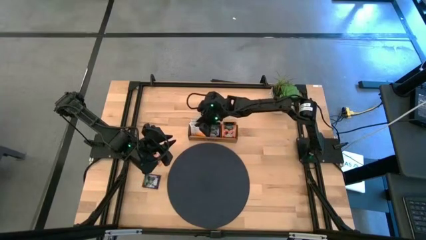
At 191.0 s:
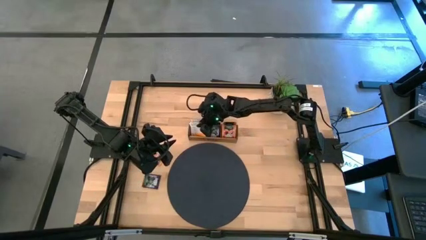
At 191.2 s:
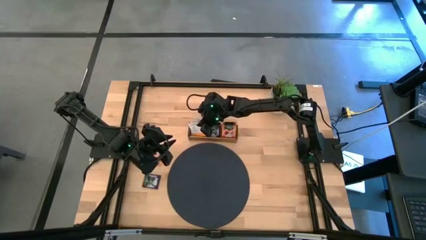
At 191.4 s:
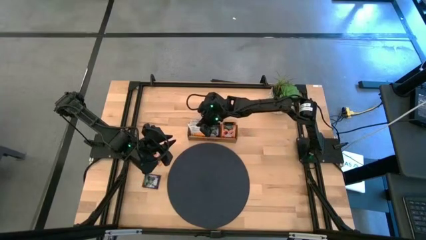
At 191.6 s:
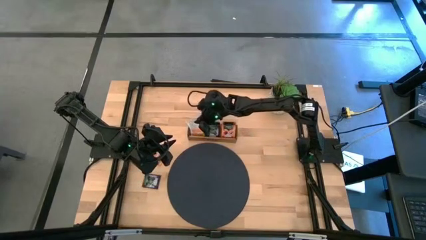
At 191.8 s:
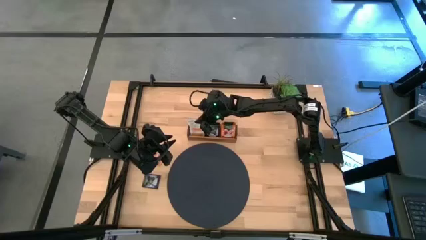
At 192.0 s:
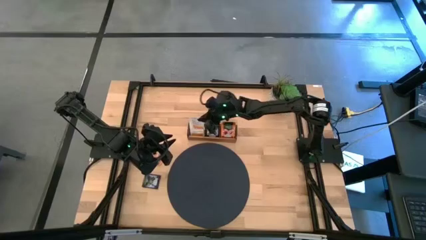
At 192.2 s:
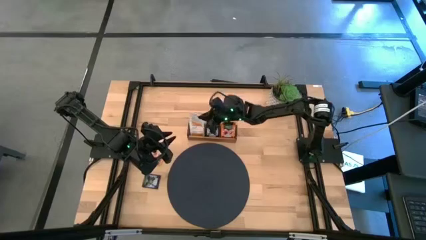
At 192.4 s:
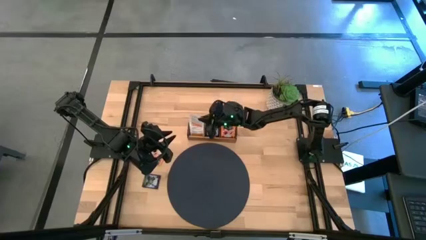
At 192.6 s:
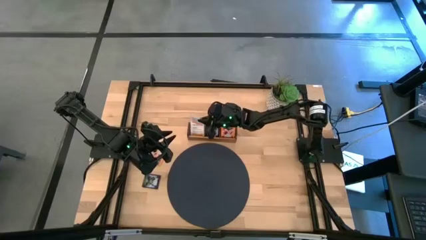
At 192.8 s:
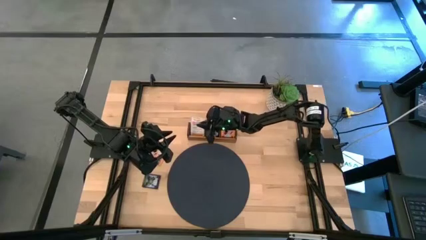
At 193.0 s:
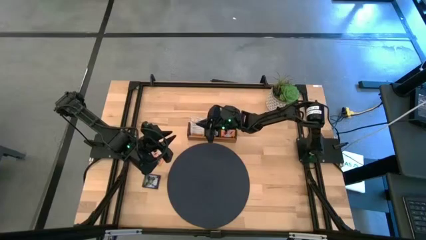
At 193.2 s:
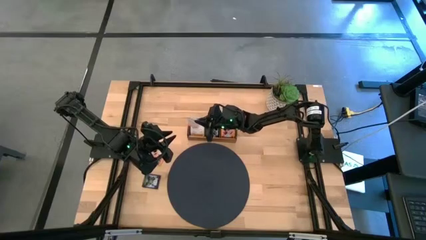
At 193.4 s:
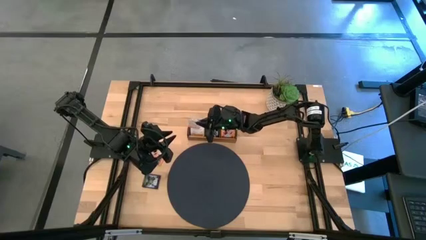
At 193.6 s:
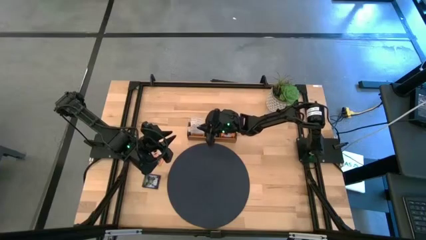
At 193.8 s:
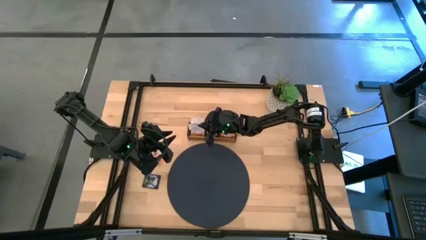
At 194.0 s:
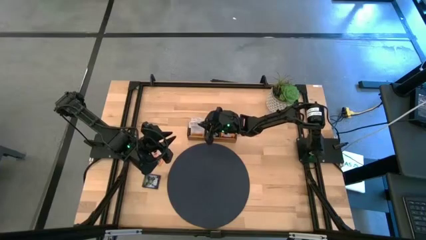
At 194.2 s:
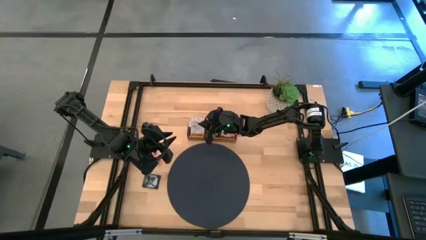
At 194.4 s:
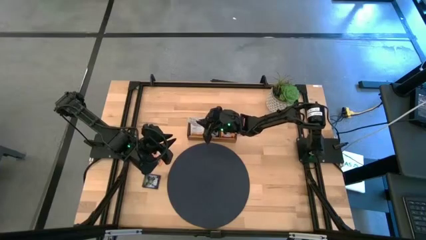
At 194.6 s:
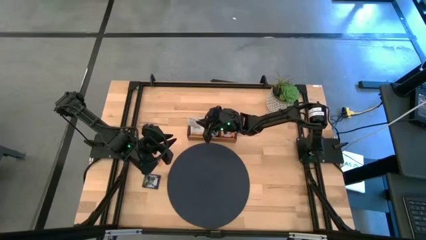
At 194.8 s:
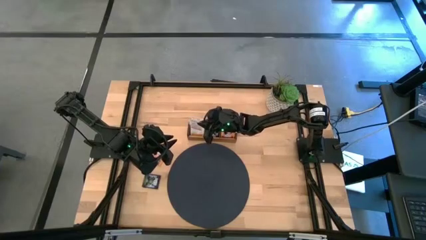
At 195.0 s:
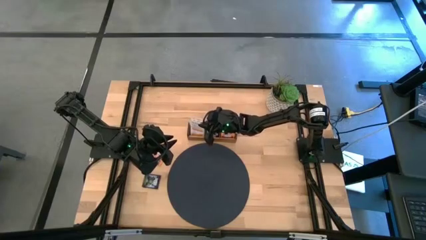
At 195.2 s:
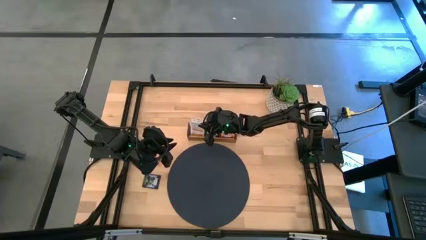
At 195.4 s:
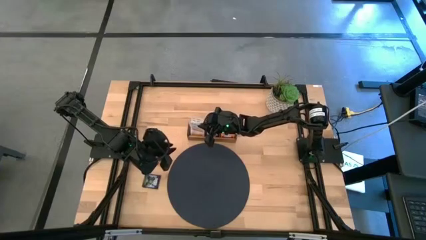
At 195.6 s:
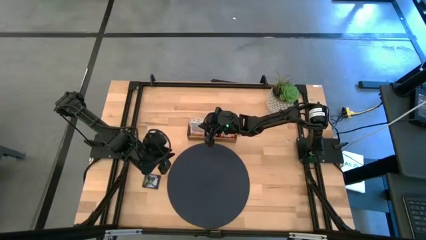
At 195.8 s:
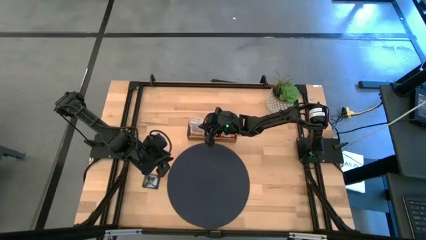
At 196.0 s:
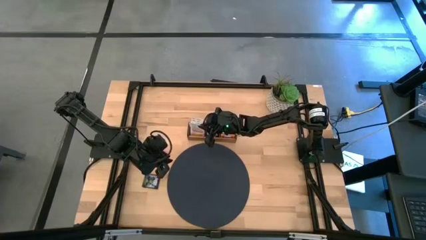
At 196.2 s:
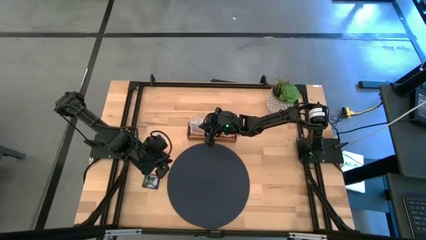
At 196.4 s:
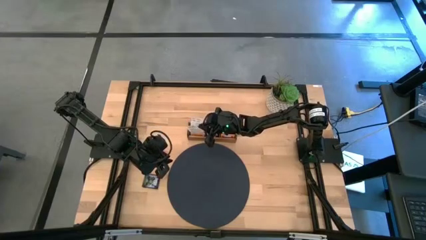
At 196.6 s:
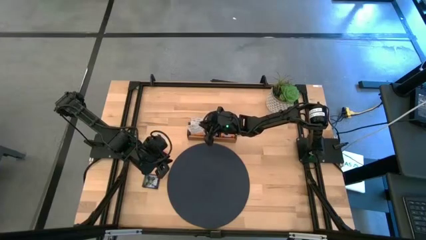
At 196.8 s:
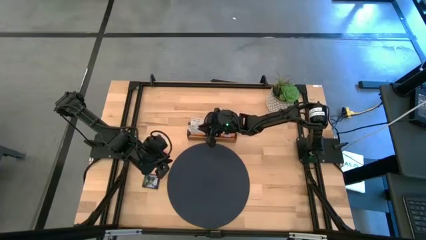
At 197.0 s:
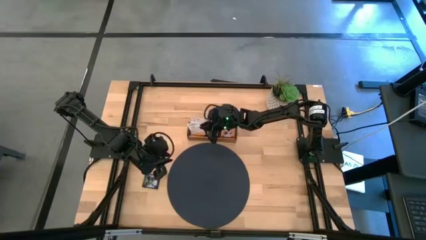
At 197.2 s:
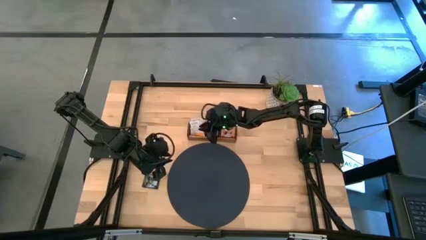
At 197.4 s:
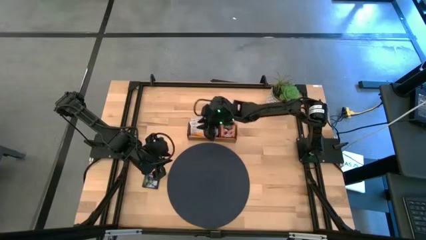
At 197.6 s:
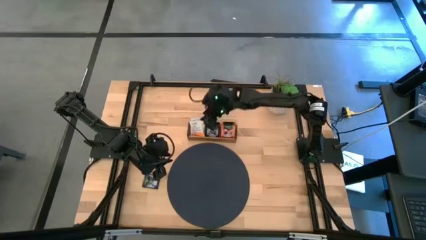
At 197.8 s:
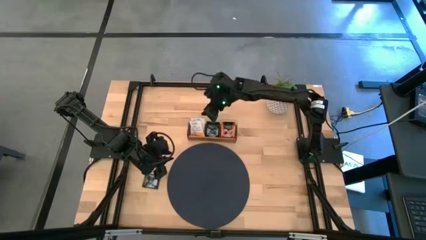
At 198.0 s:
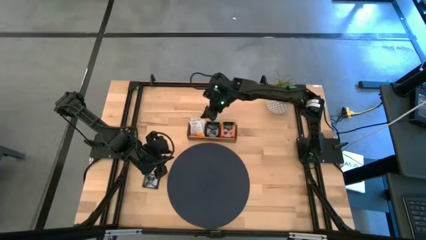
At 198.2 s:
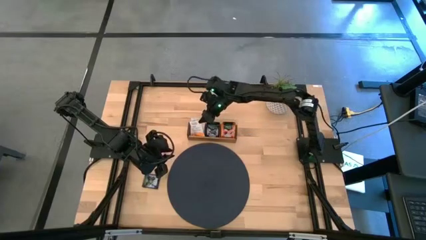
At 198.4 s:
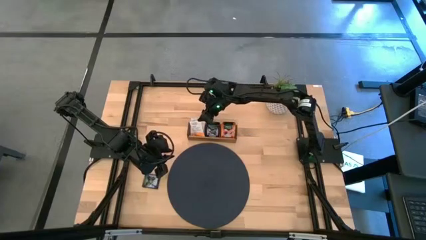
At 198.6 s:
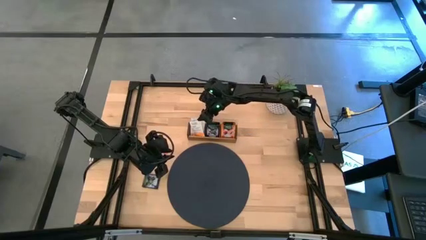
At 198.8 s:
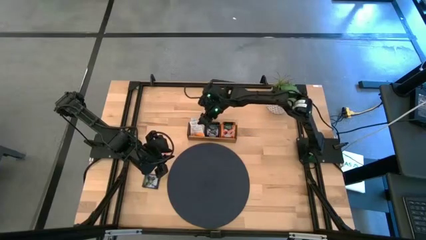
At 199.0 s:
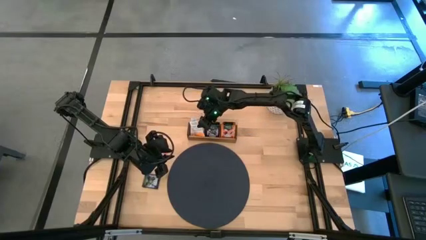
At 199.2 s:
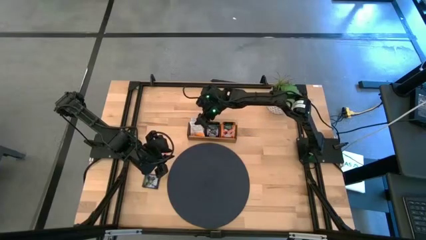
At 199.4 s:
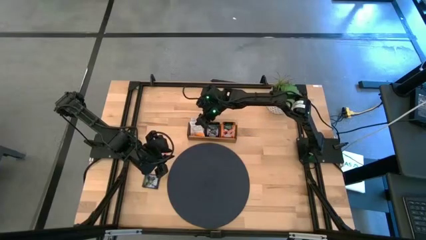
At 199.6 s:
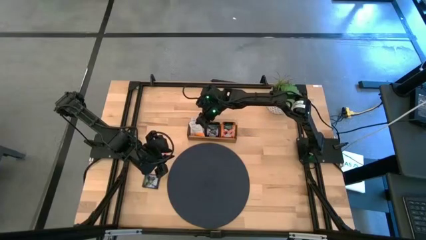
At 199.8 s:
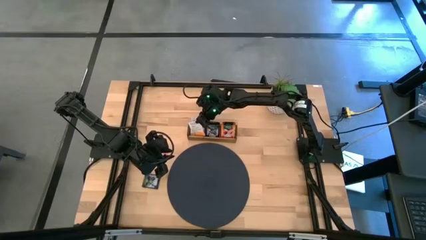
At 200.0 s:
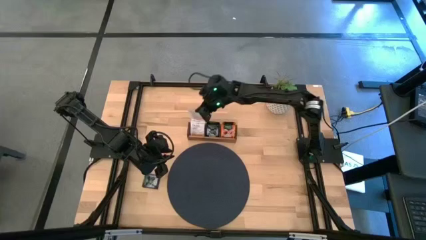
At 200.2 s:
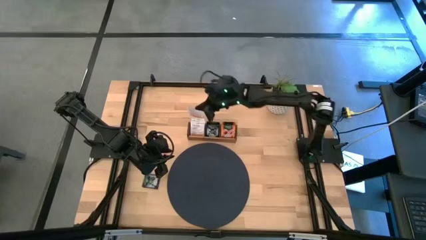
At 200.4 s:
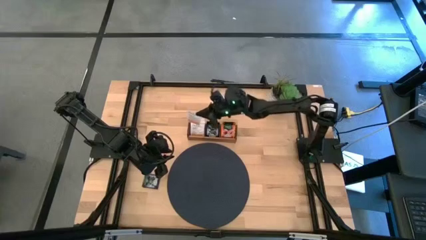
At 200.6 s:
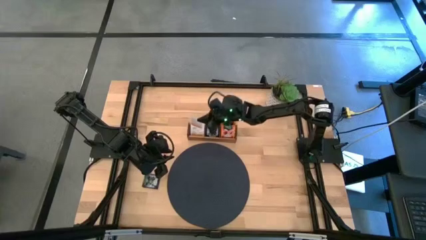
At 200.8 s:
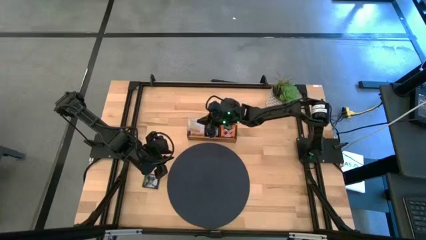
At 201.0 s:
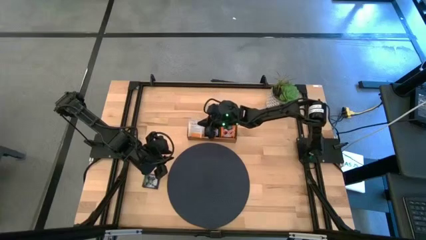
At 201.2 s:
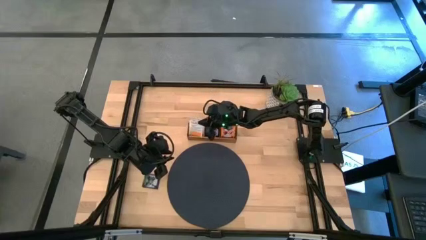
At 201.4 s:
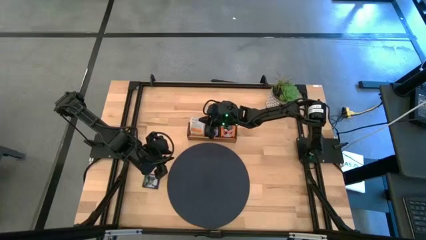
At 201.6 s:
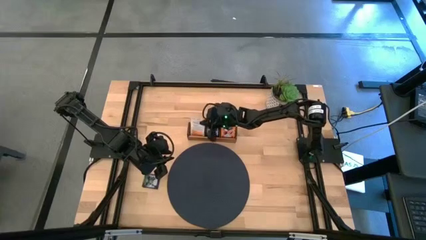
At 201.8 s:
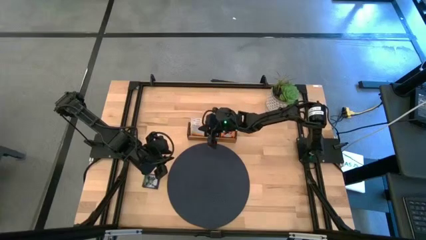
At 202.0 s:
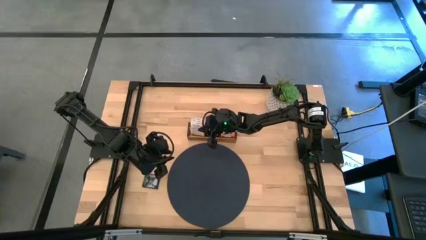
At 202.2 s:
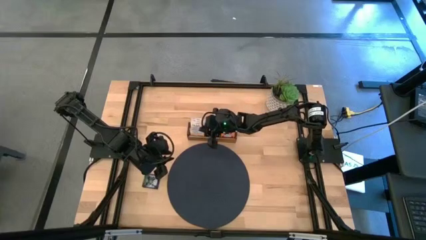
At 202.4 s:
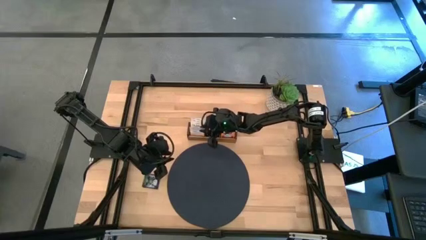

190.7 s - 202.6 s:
Task: Pick & Place Tea
Put the white tea bag into the left of the wooden organizer

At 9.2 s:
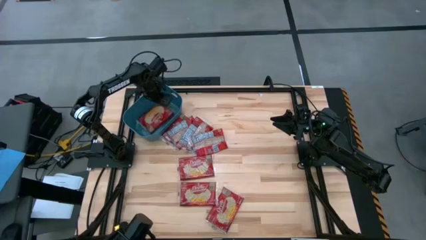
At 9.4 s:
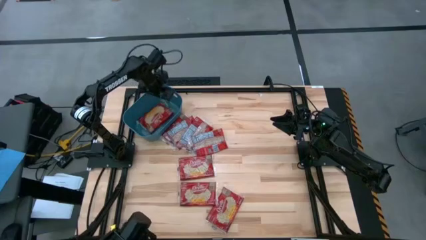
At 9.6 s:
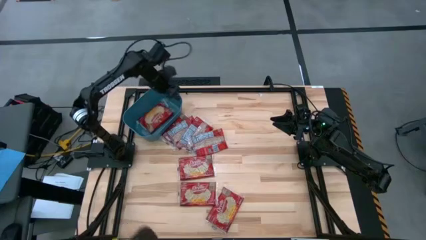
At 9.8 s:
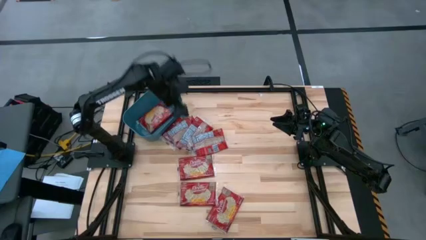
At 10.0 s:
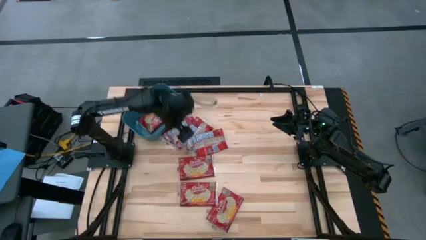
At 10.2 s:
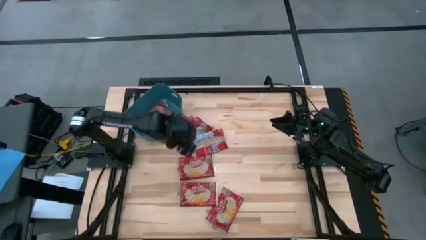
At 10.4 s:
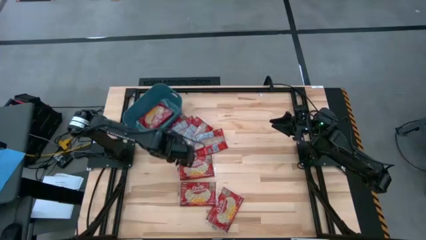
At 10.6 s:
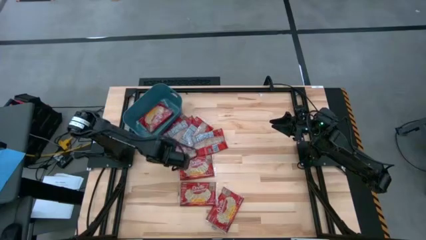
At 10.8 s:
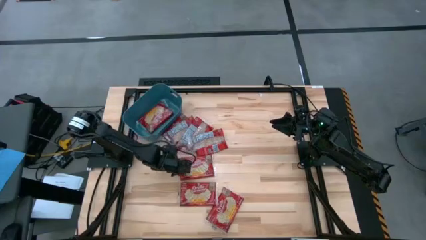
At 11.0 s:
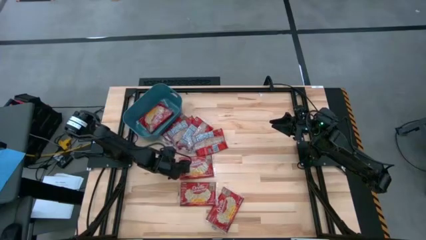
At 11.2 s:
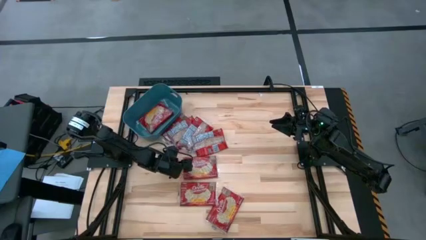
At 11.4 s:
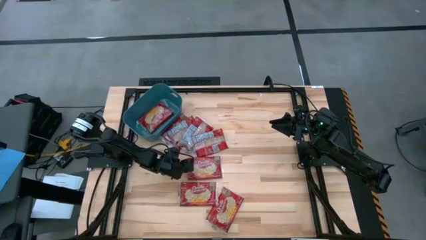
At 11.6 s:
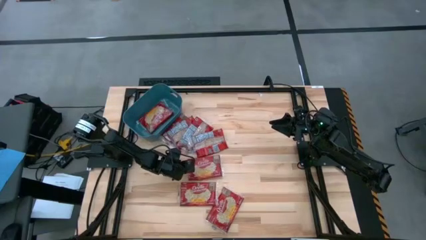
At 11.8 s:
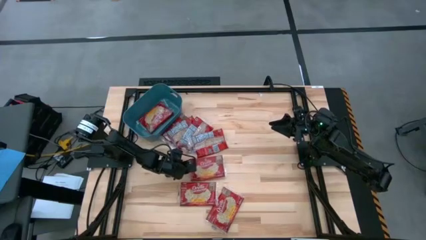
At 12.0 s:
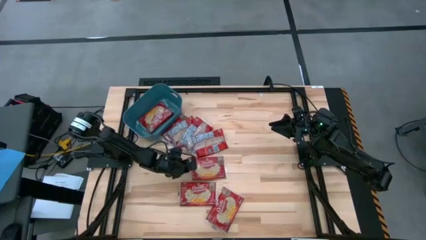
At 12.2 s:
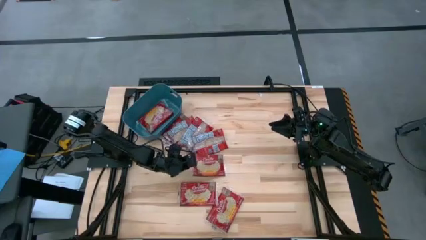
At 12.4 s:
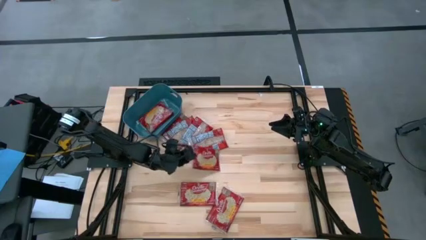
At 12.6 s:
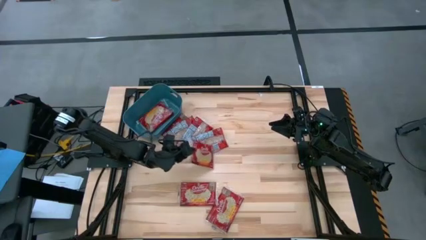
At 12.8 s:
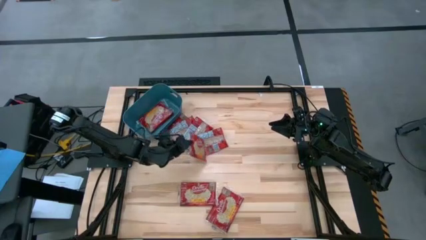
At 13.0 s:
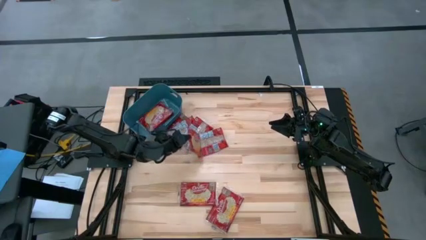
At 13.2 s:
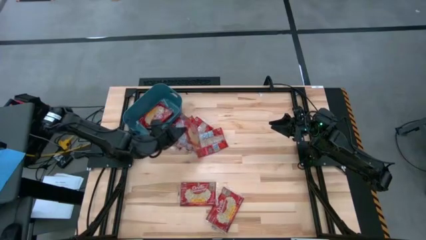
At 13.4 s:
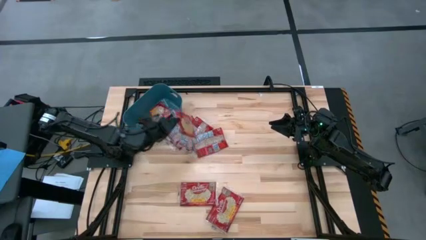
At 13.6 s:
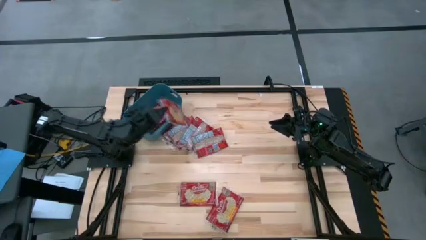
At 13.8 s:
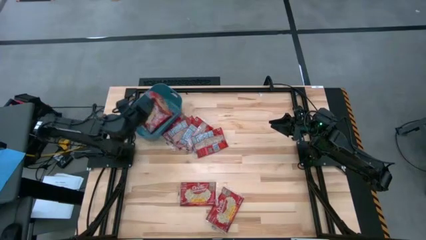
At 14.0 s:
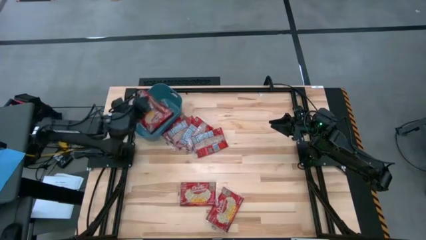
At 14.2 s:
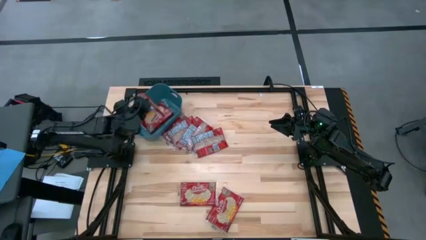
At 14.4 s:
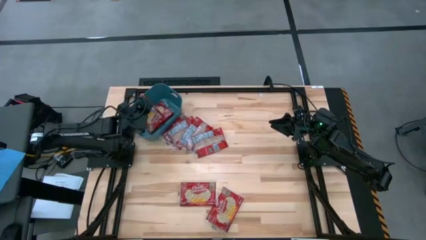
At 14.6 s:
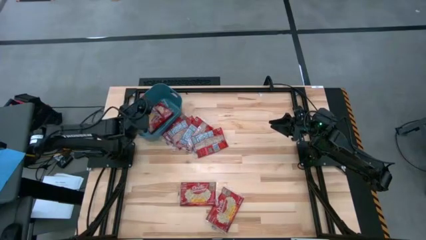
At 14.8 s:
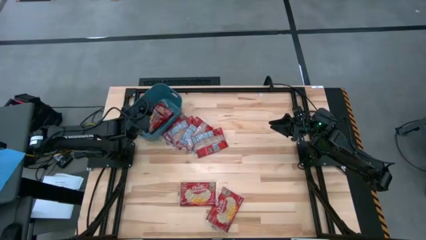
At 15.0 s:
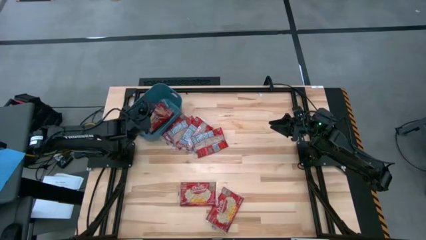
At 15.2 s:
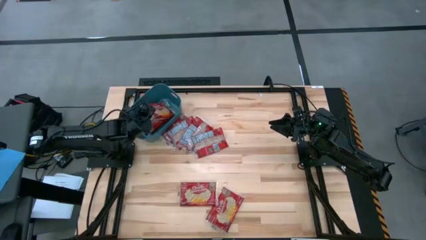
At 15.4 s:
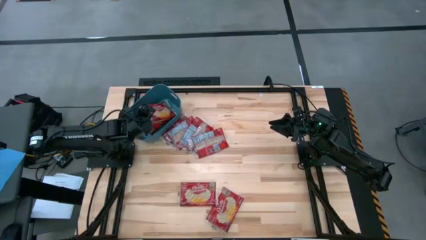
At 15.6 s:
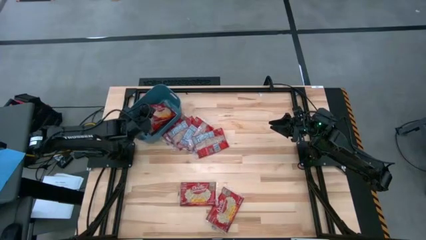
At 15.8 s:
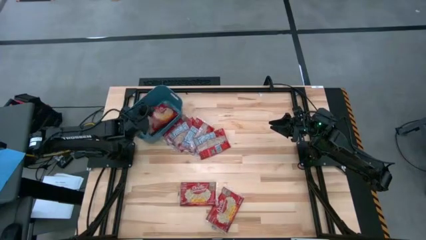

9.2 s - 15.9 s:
Task: Sort popcorn bags into baskets
Put the popcorn bag into the green bin
